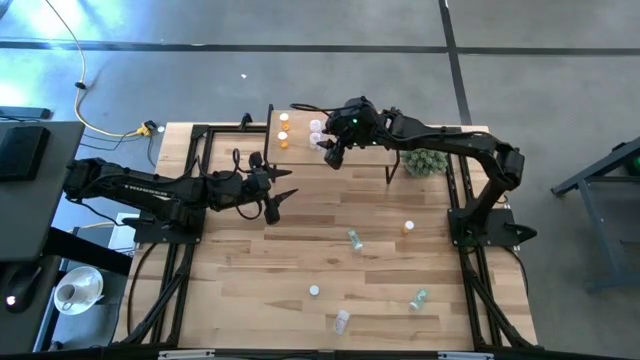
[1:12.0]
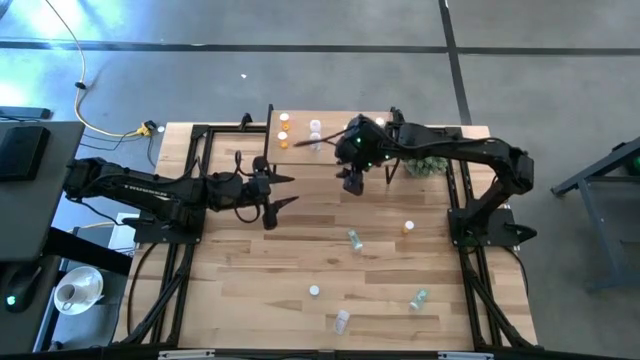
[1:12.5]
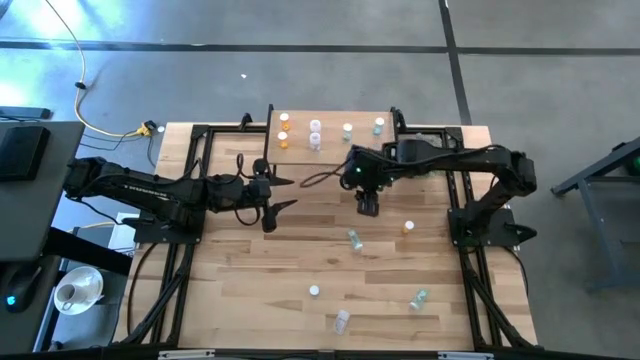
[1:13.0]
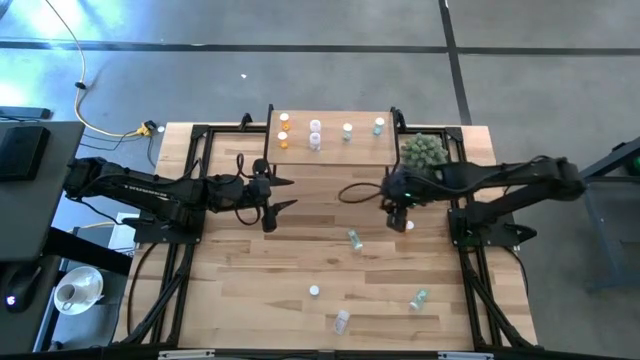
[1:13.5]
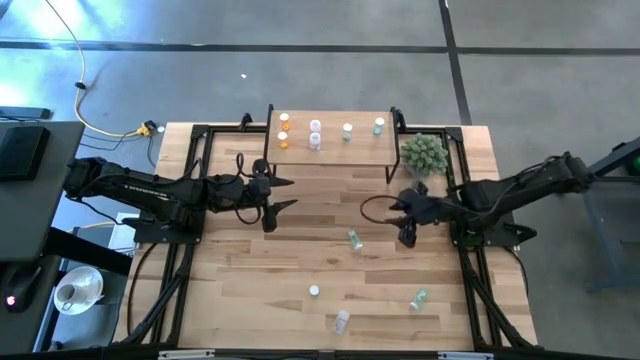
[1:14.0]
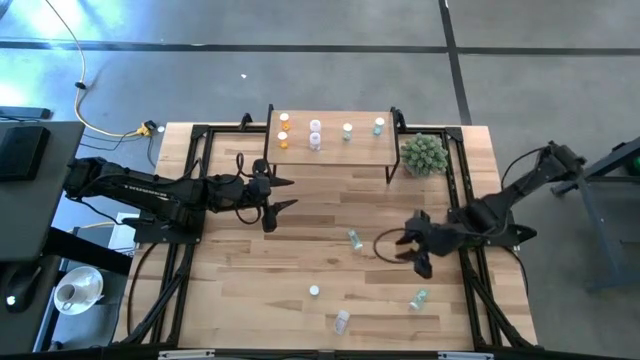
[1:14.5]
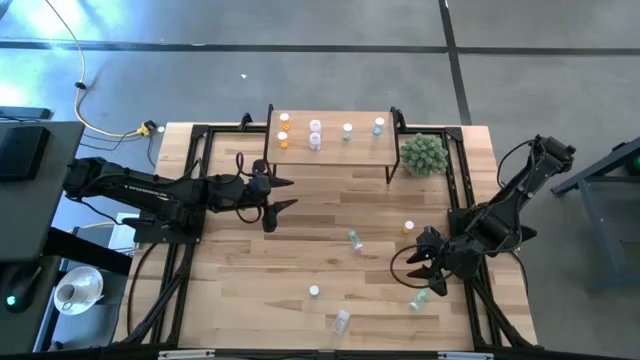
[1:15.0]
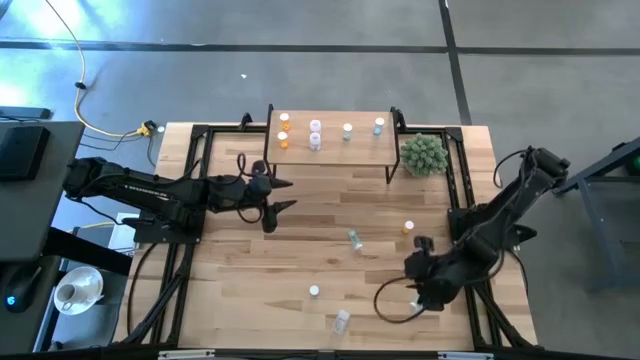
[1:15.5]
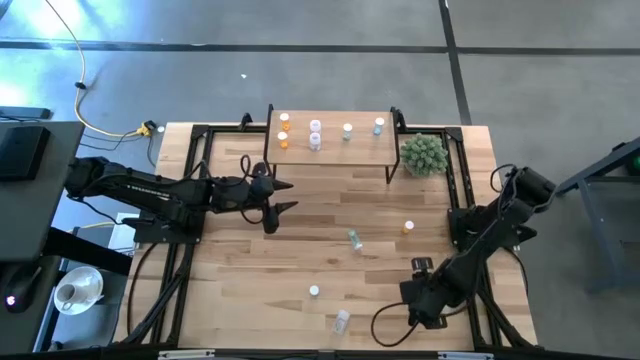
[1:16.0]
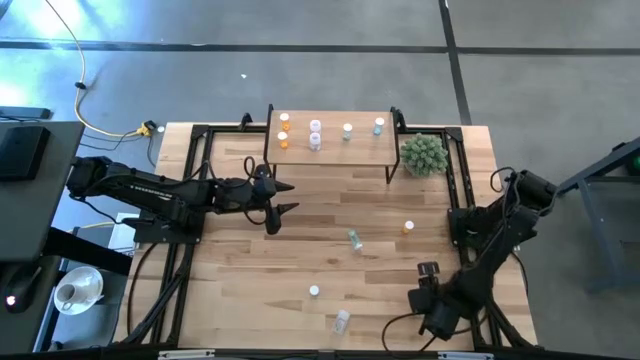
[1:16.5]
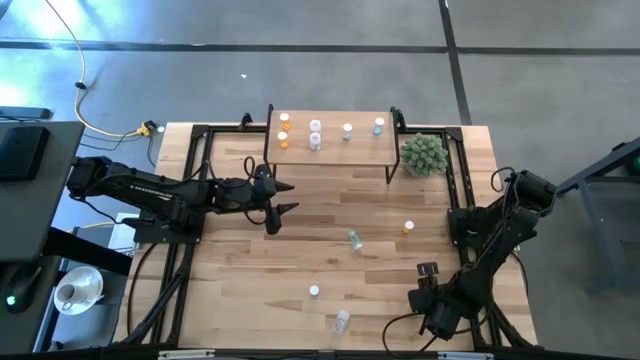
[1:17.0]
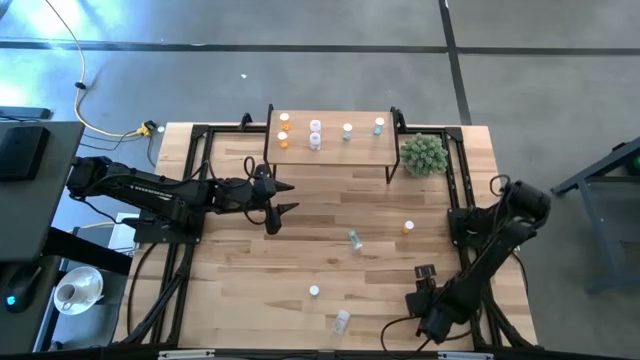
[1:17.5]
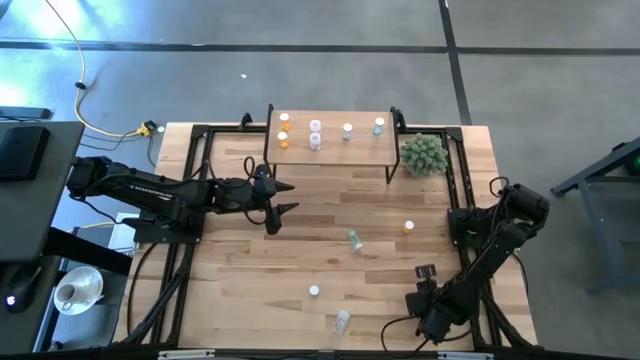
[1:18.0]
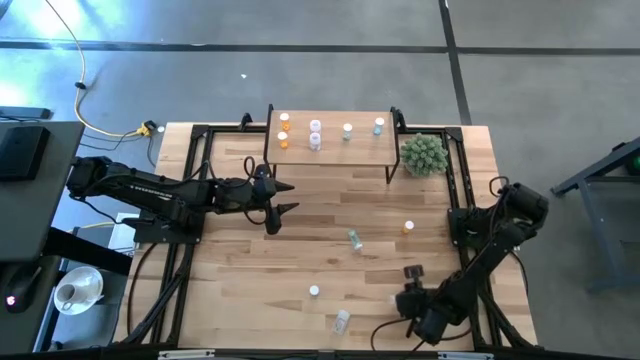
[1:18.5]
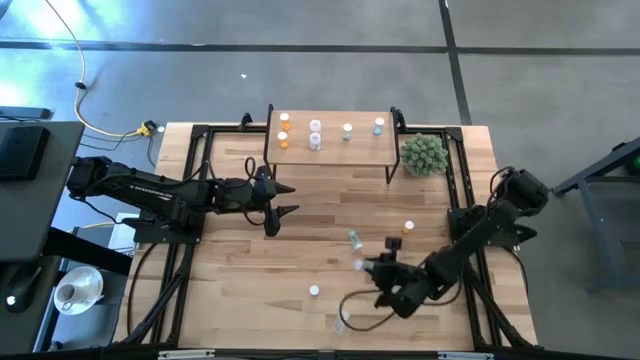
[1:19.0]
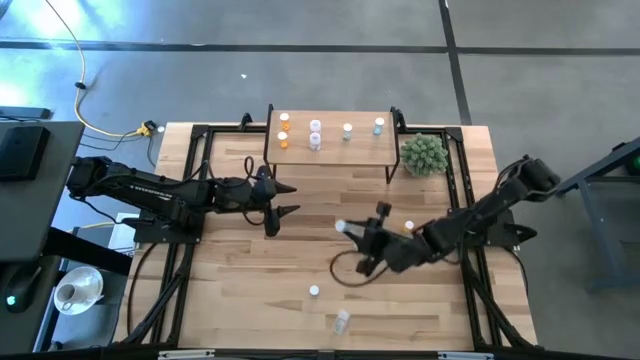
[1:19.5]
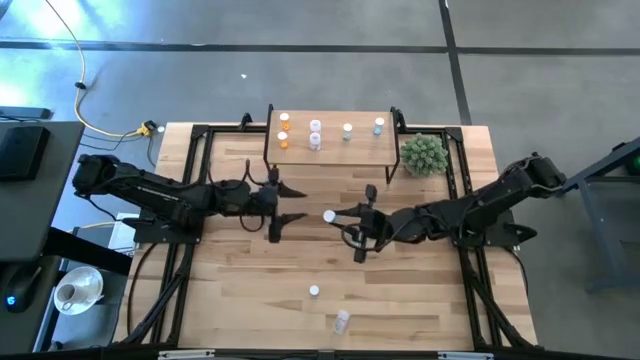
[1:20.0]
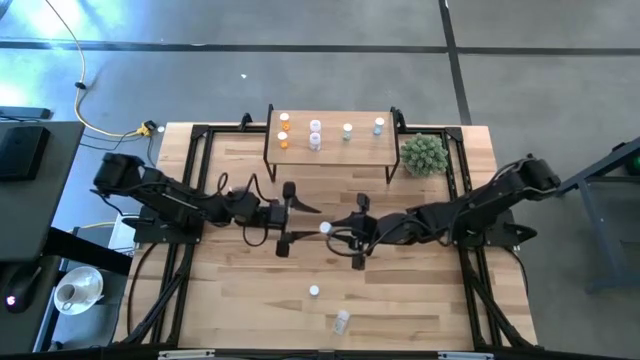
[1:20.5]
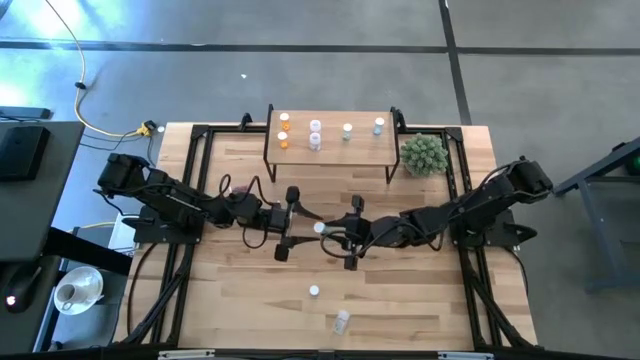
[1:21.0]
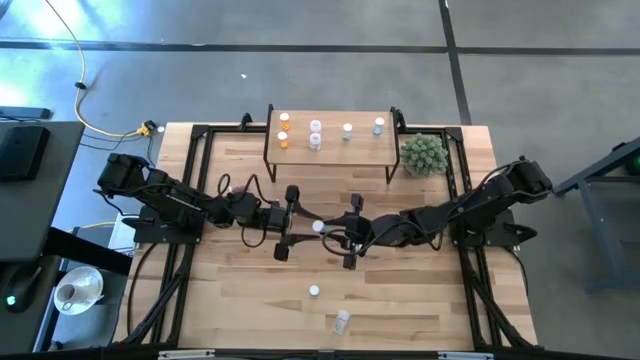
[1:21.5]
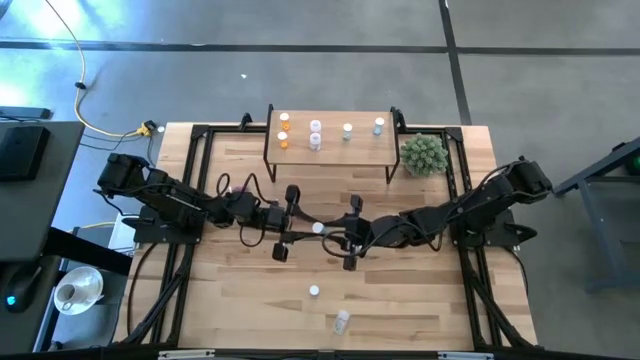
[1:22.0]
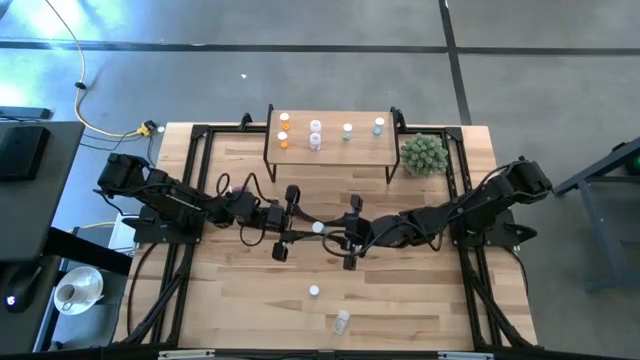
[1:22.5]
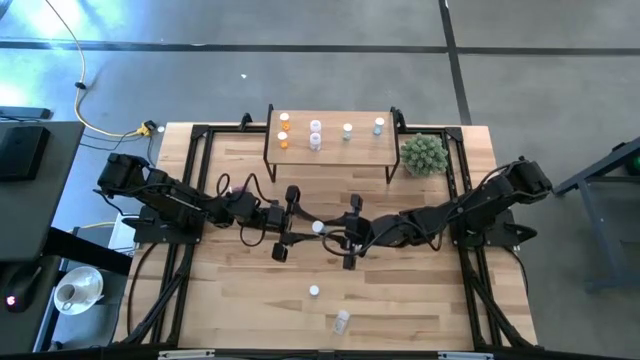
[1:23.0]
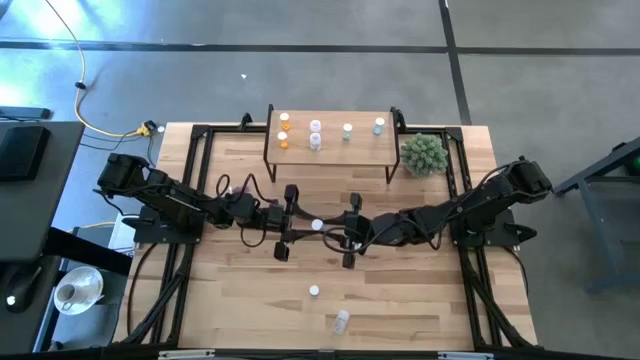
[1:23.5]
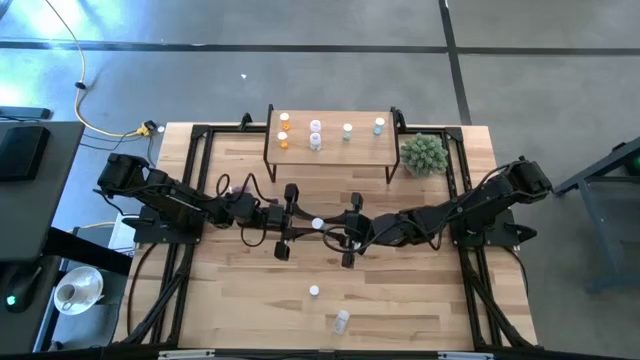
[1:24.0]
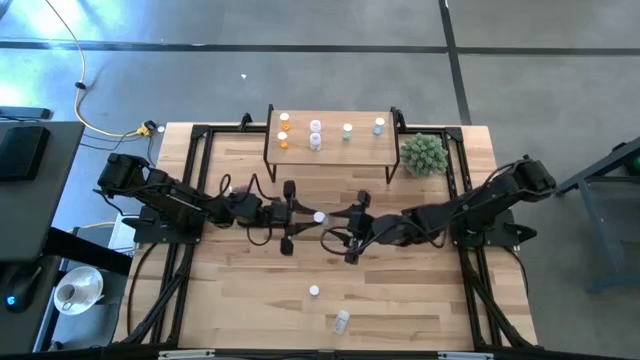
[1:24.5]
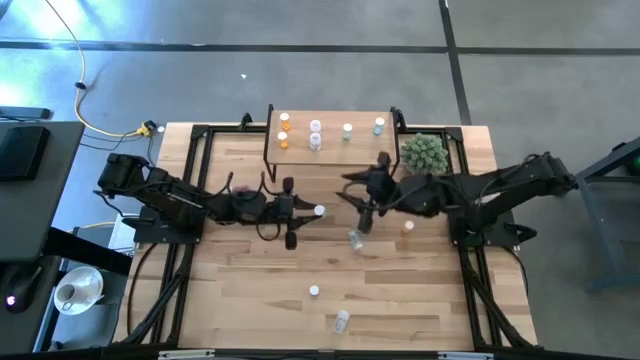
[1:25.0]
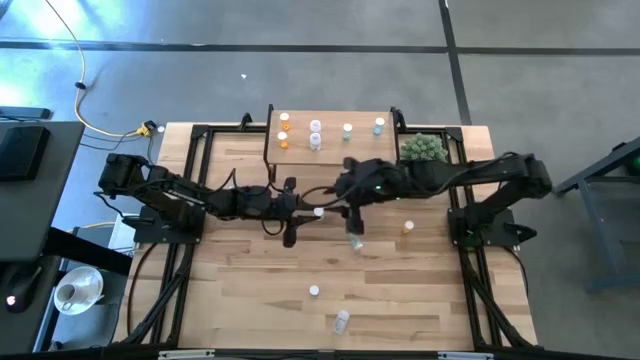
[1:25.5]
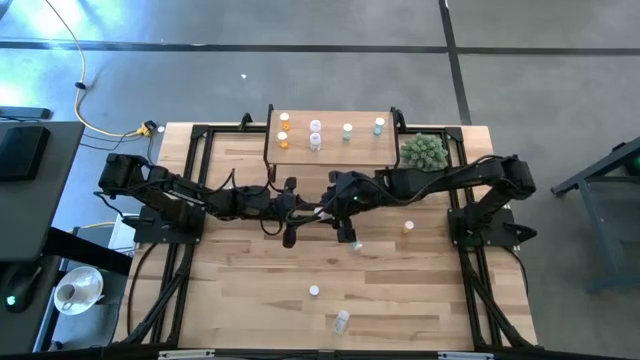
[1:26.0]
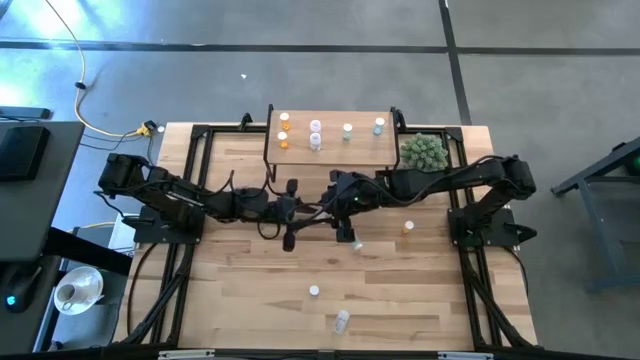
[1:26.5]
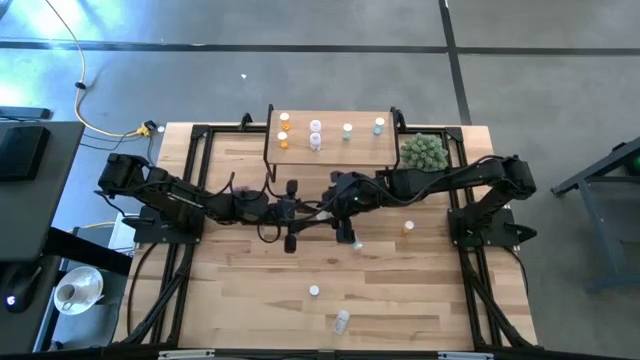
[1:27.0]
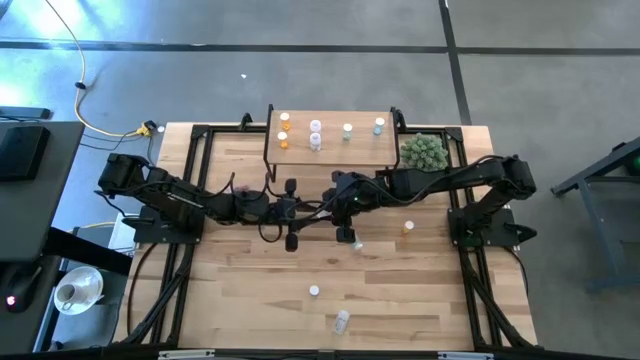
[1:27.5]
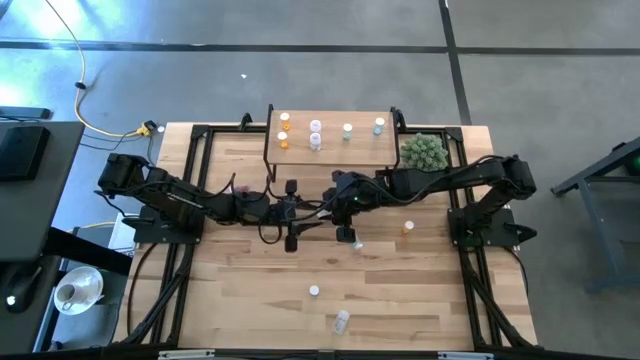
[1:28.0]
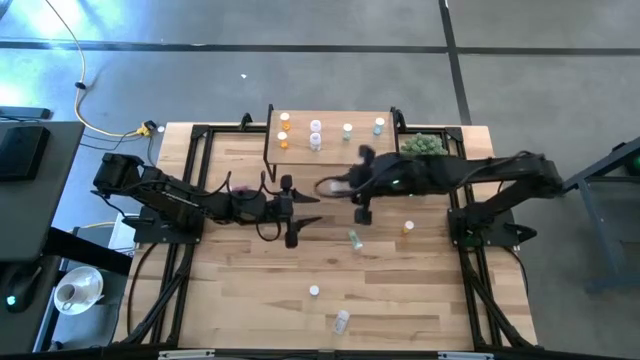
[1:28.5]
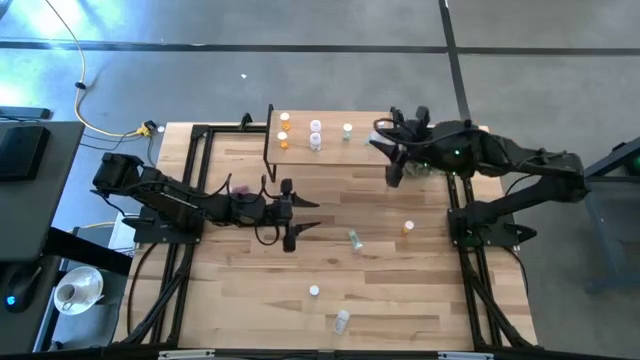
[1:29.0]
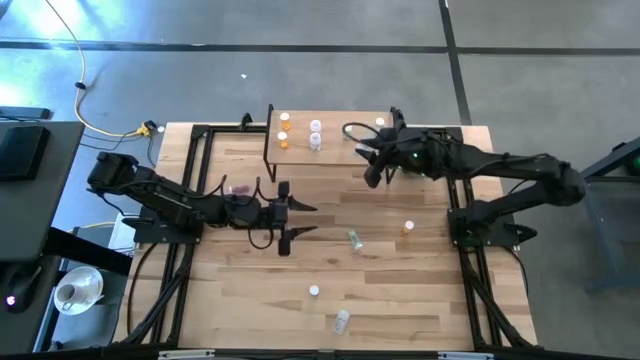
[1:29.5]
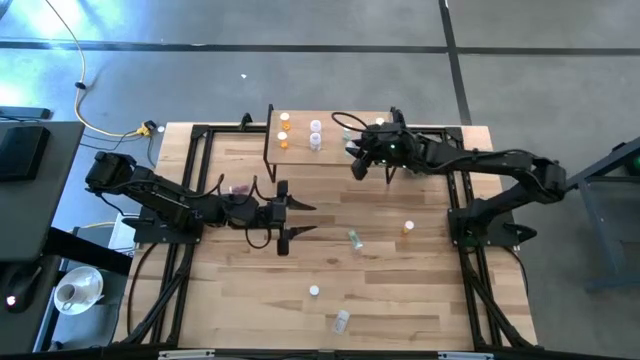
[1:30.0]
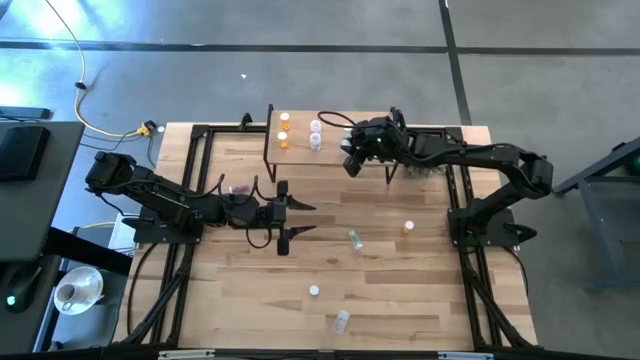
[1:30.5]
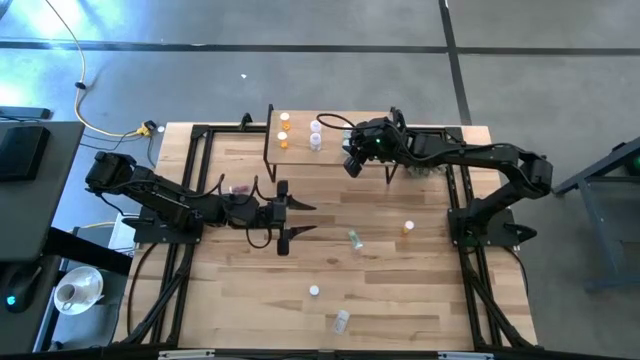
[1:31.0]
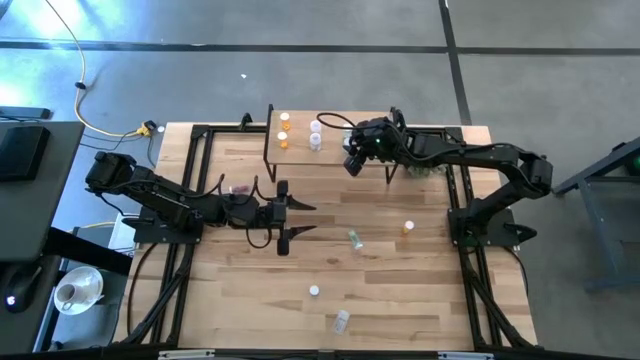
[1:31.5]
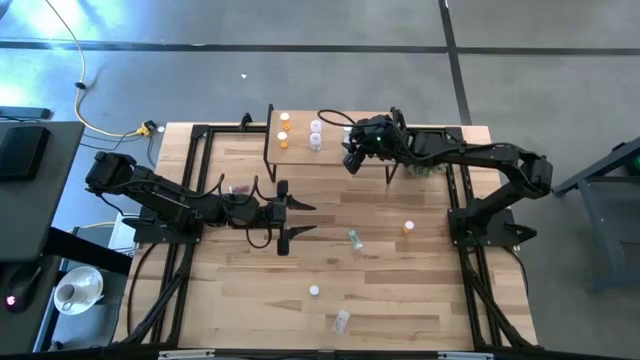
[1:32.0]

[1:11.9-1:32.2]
Task: Pick and place medicine bottles onto shelf by color
Put the bottom green pill bottle on the shelf and aligned with the other green pill bottle

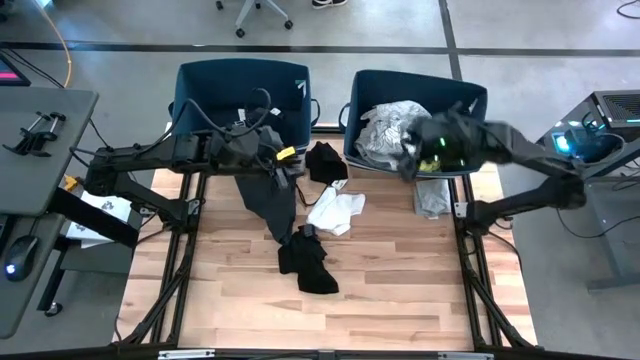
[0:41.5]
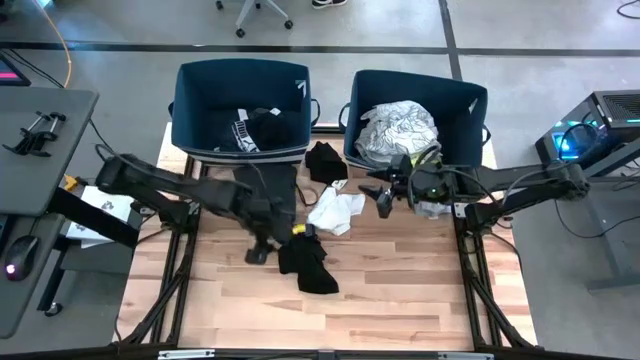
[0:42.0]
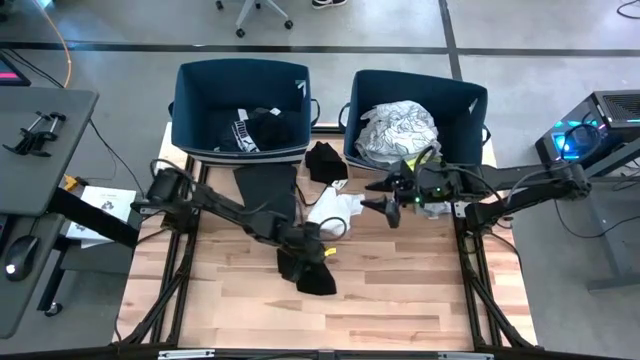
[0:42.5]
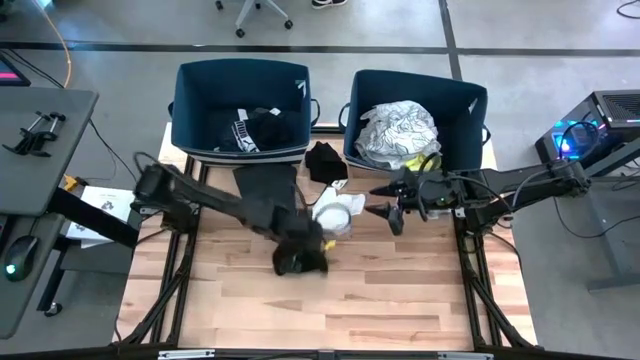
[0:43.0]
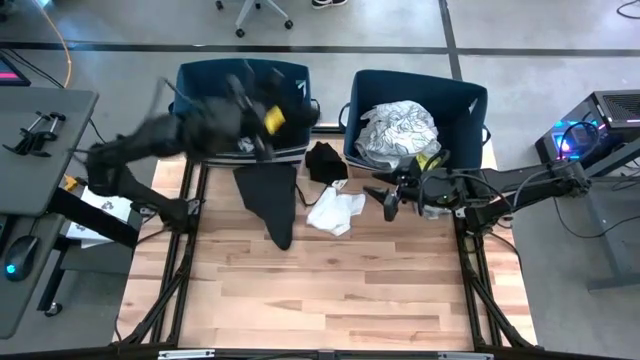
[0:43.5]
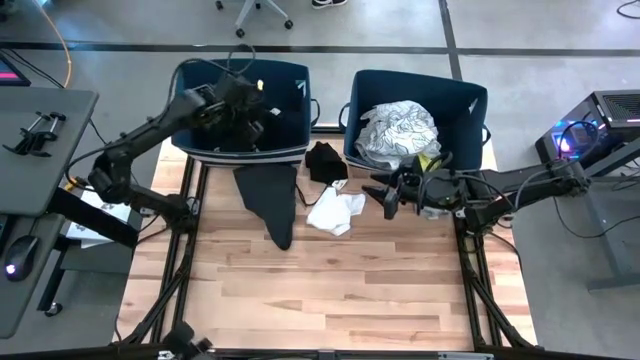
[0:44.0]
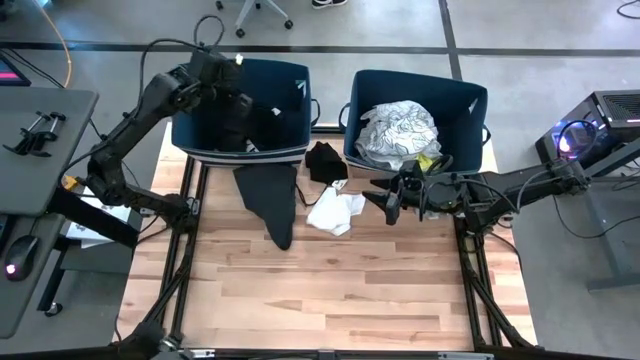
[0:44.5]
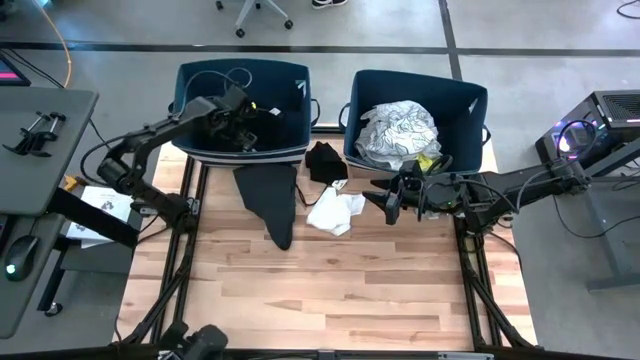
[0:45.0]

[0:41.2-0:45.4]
Task: Sort clothes
Put the black underwear into the left laundry bin
